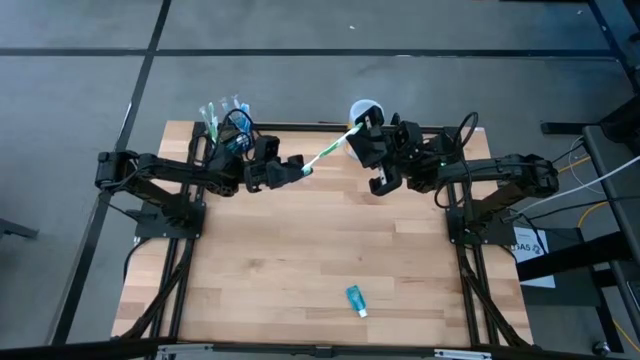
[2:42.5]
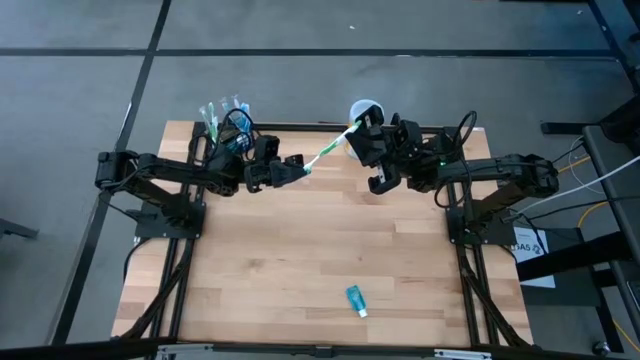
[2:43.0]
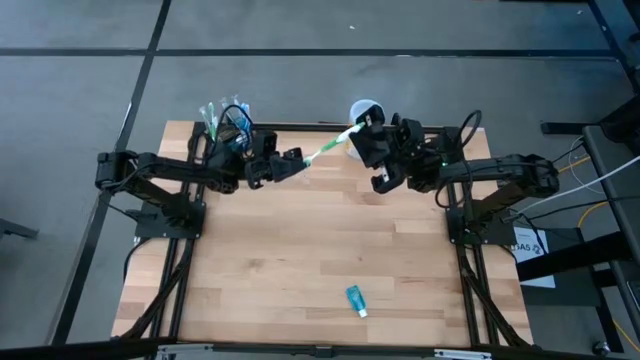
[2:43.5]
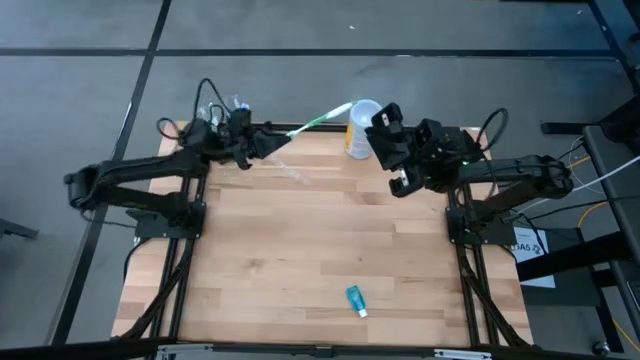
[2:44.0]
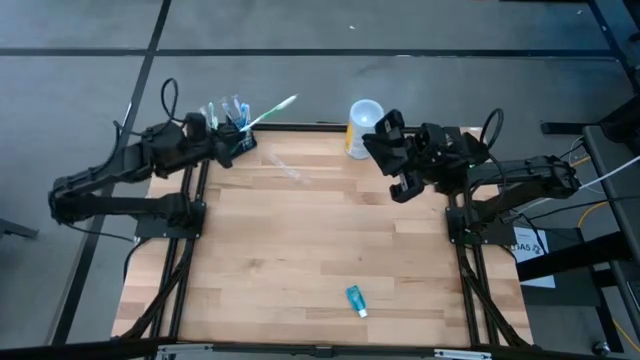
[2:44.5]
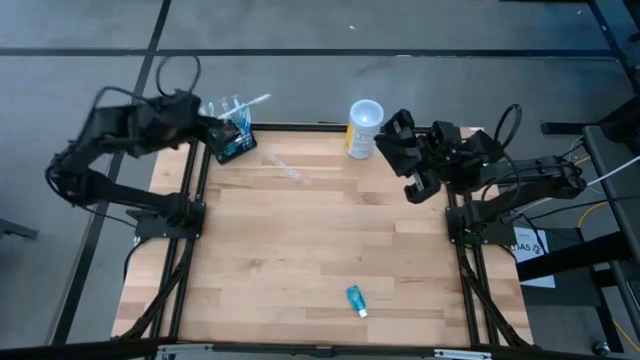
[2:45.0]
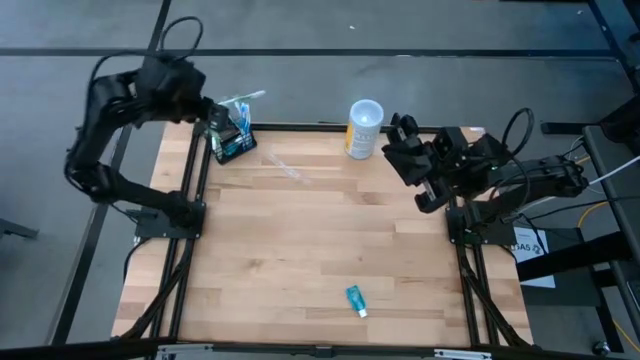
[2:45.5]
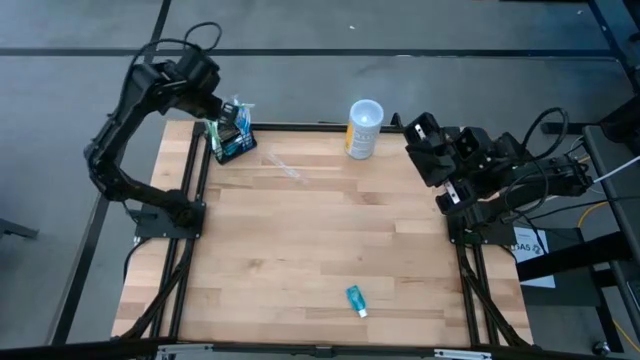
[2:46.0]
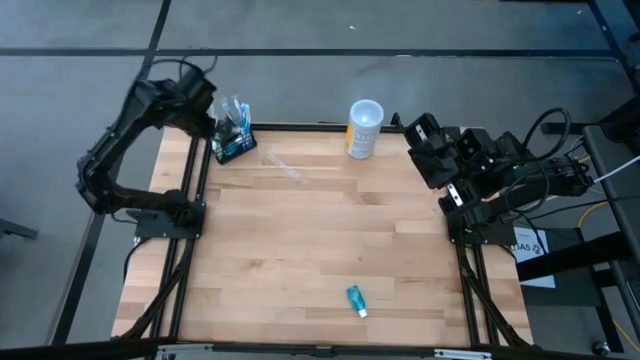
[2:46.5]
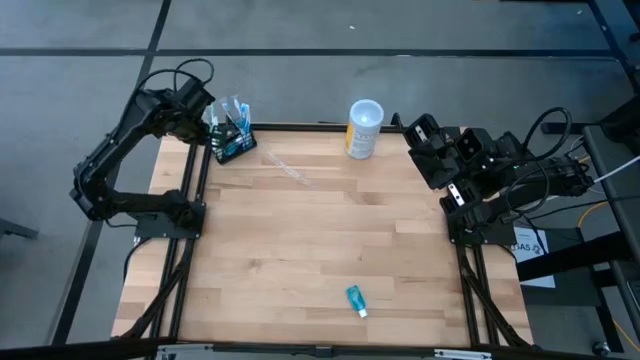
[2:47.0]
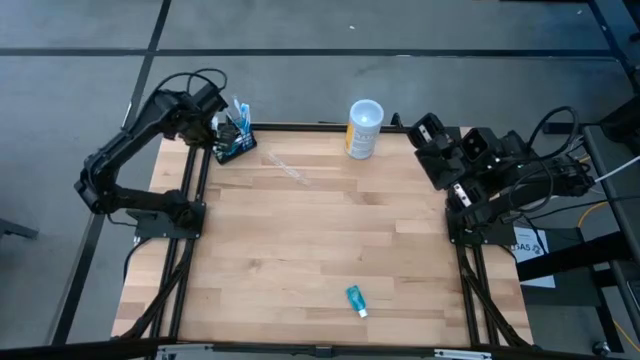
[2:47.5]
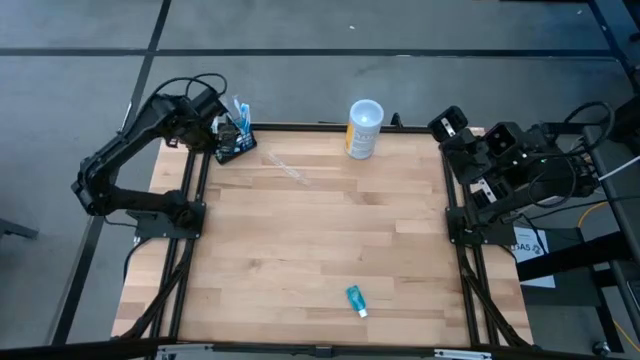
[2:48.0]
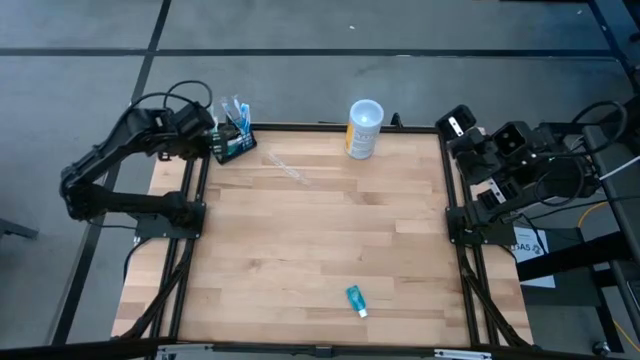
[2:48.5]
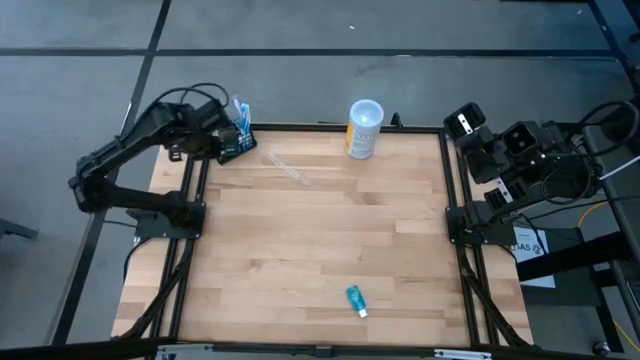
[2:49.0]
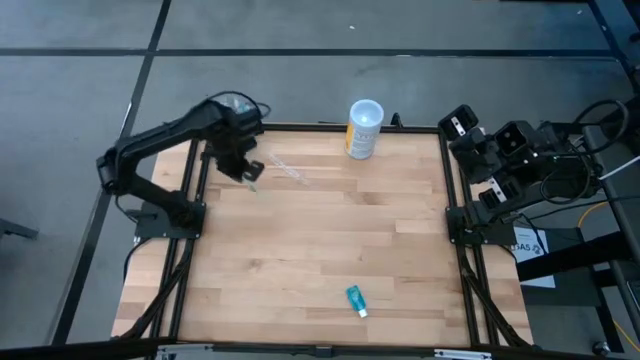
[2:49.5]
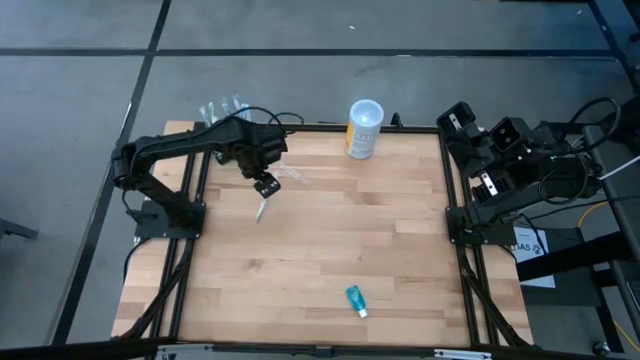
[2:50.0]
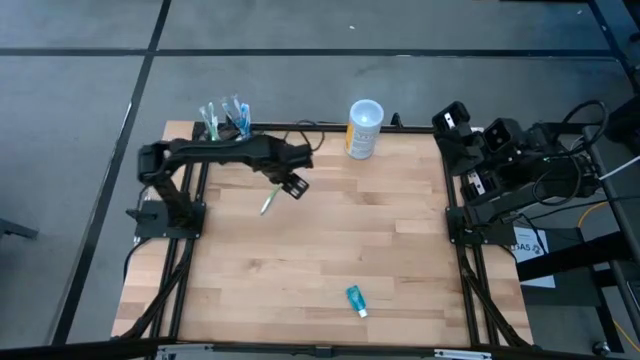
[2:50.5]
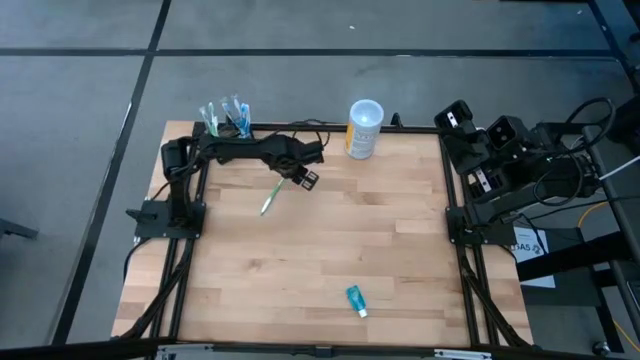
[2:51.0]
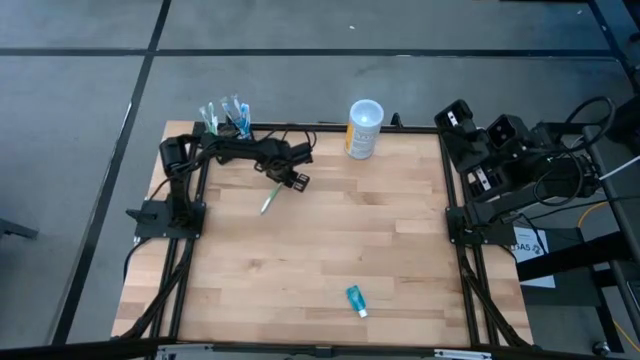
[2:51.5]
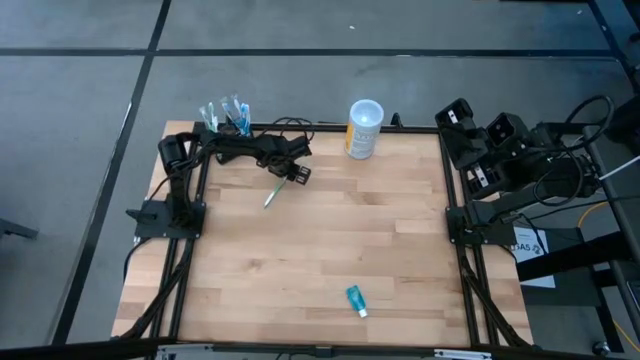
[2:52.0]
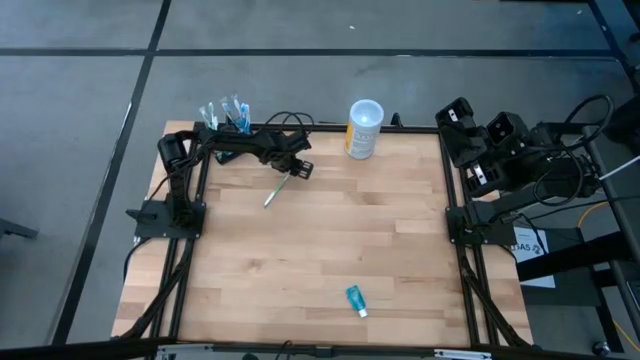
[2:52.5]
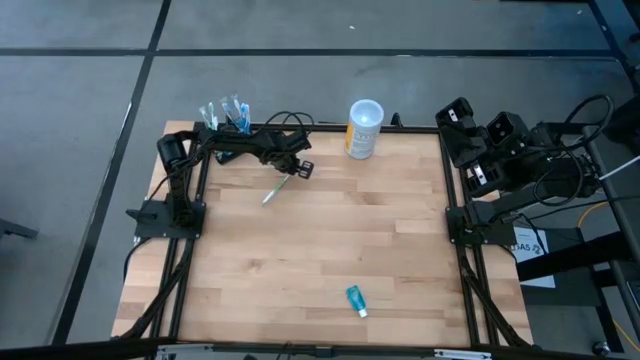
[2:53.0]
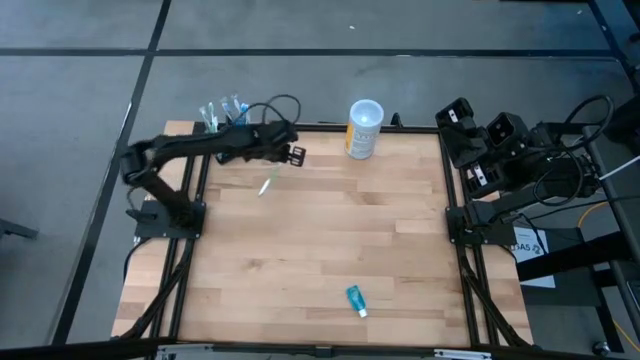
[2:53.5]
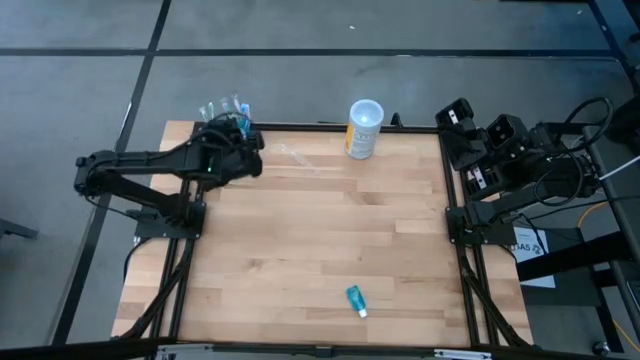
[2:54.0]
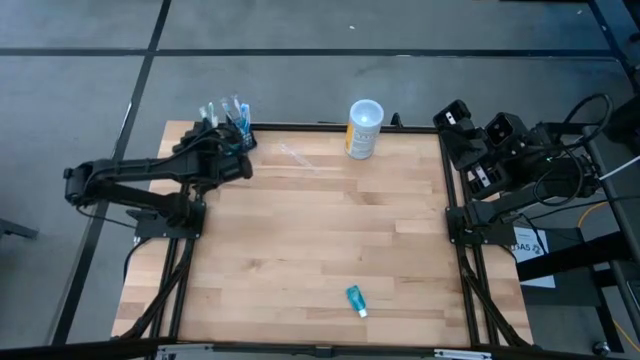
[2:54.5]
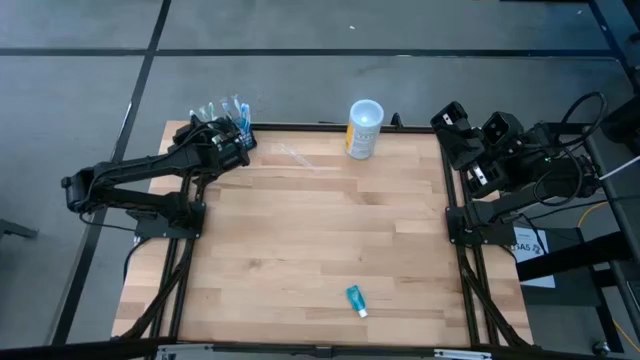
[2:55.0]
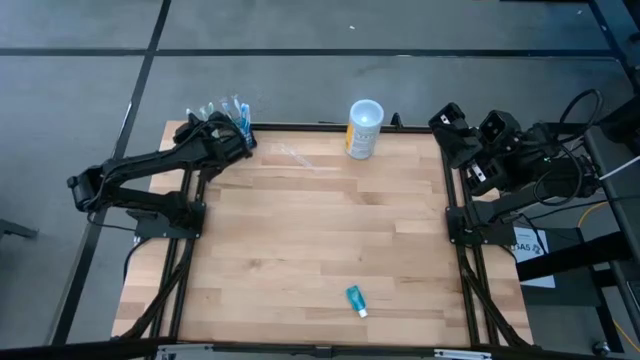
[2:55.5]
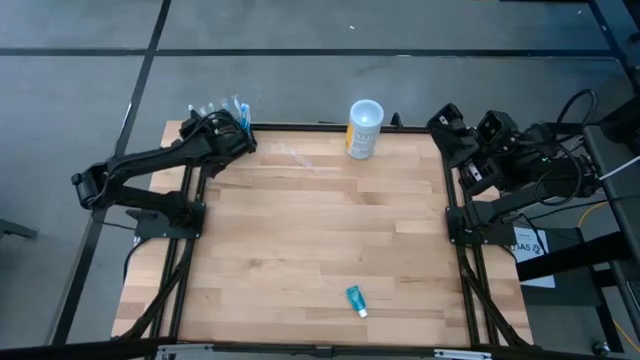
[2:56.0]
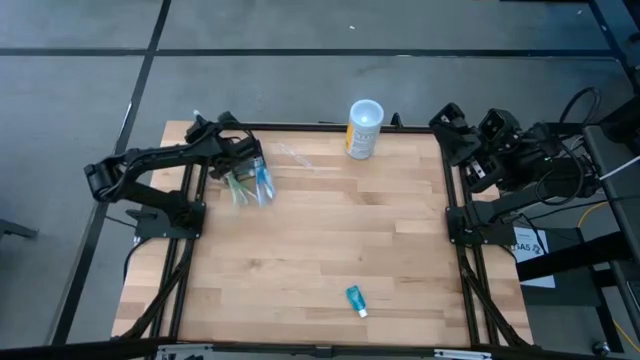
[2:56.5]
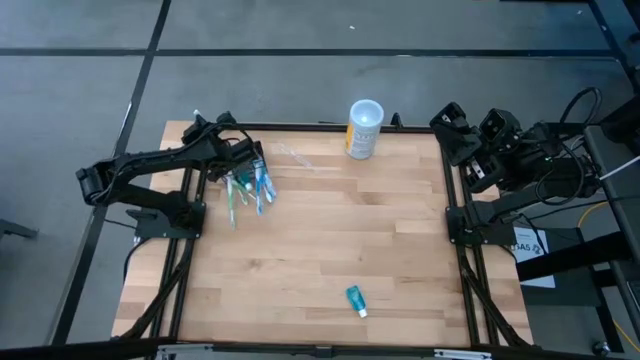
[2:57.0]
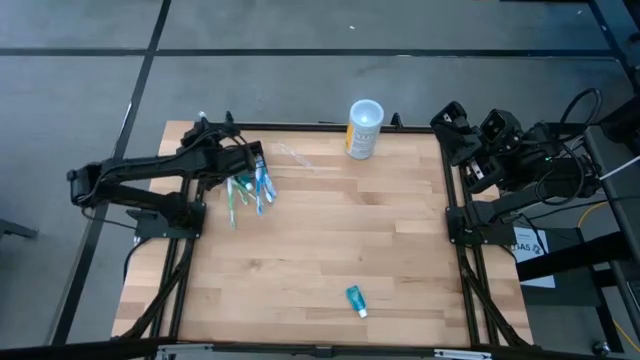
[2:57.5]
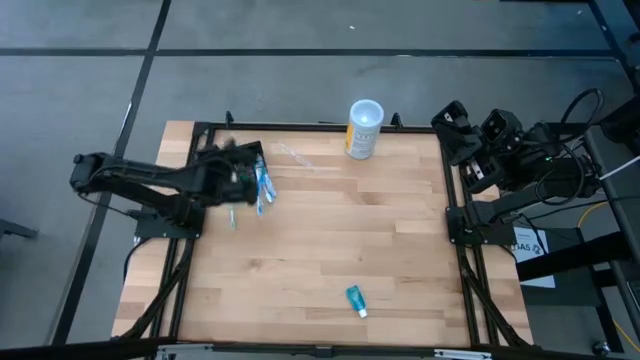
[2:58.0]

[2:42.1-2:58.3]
Task: Pick & Place toothbrushing station
Put the green toothbrush into the left section of the black organizer

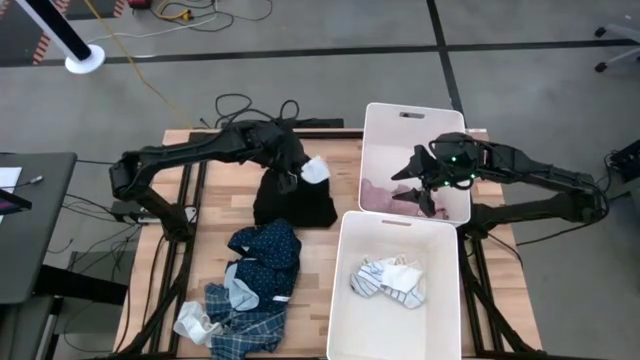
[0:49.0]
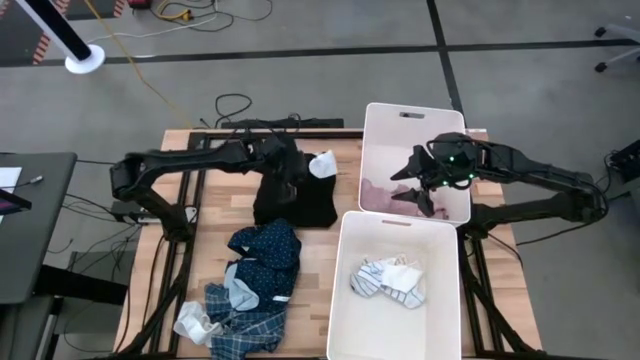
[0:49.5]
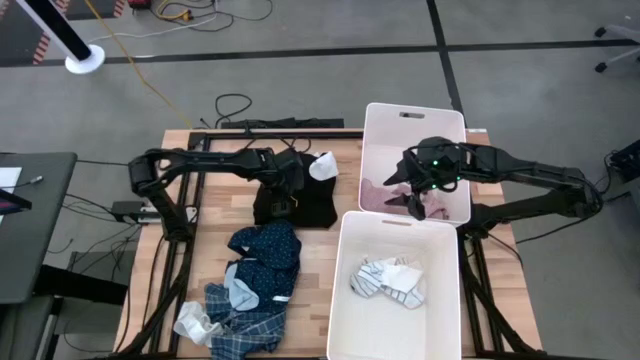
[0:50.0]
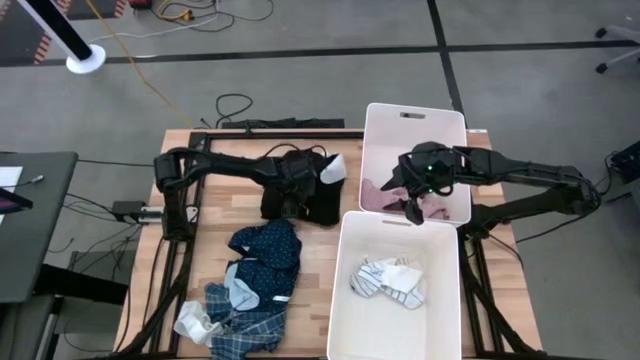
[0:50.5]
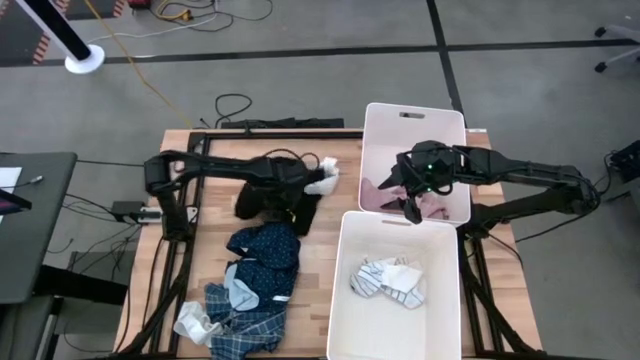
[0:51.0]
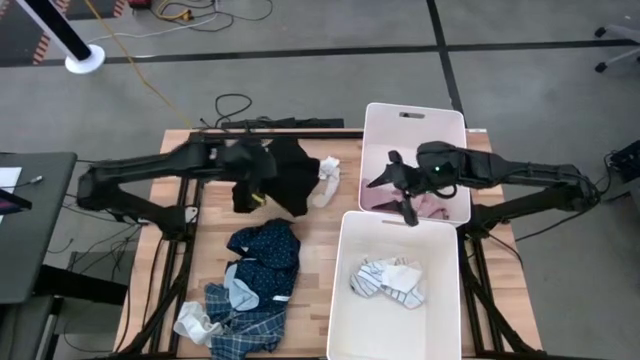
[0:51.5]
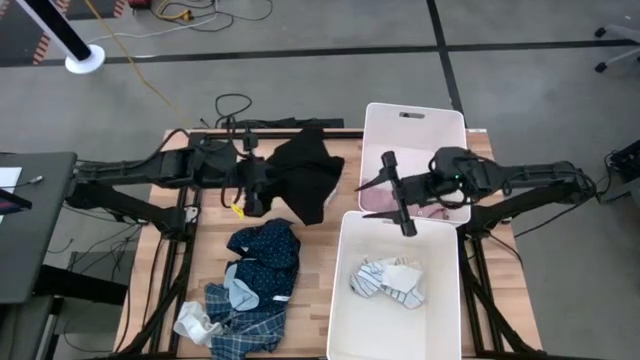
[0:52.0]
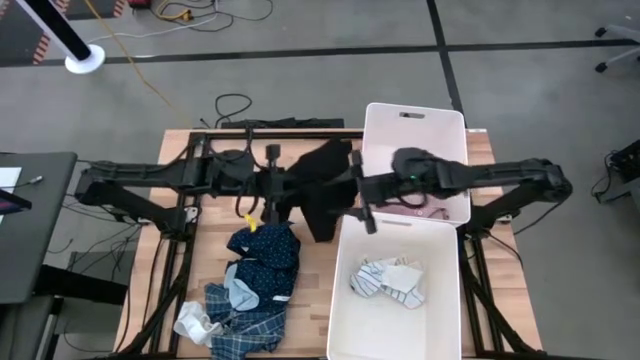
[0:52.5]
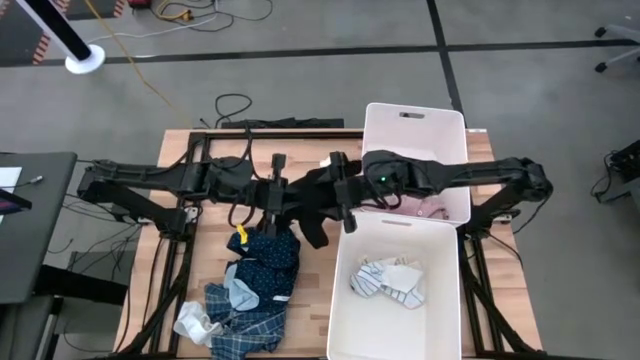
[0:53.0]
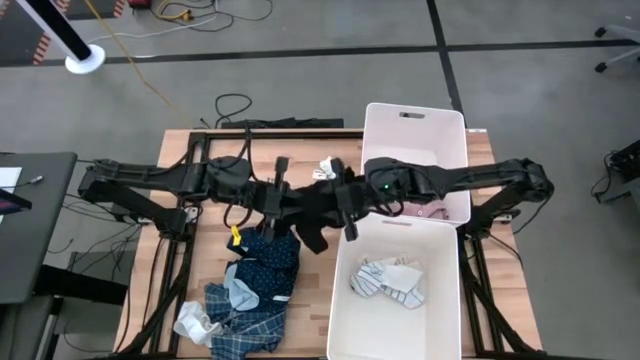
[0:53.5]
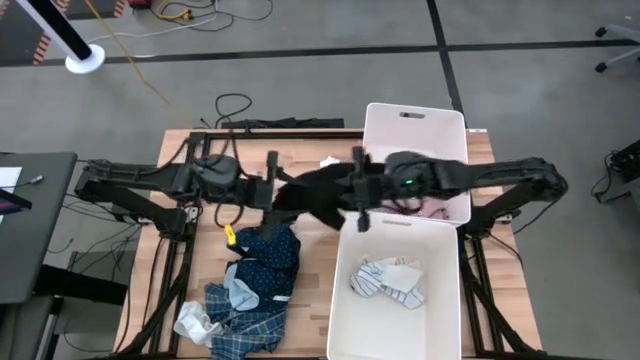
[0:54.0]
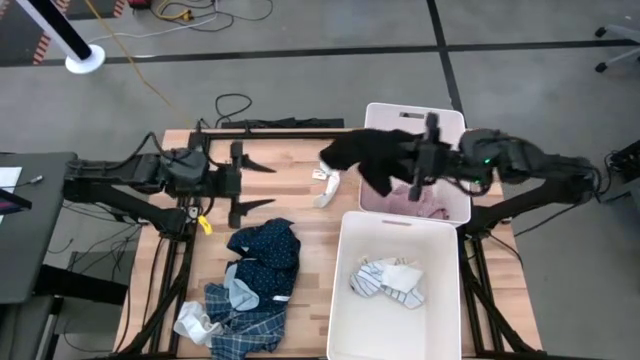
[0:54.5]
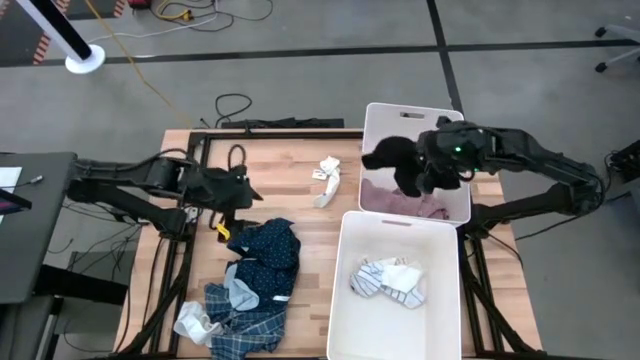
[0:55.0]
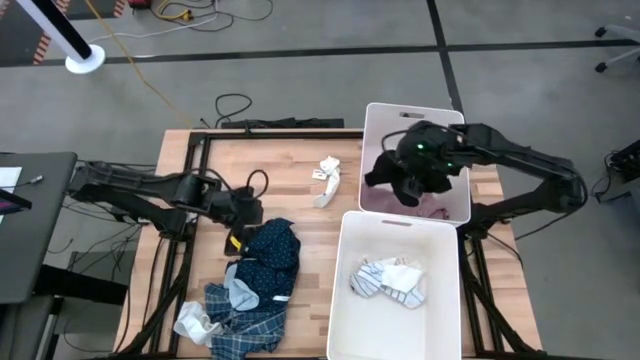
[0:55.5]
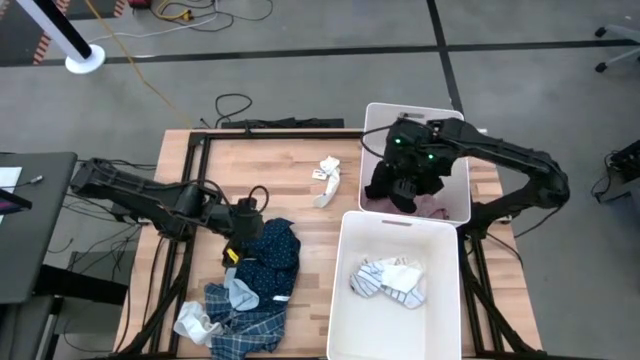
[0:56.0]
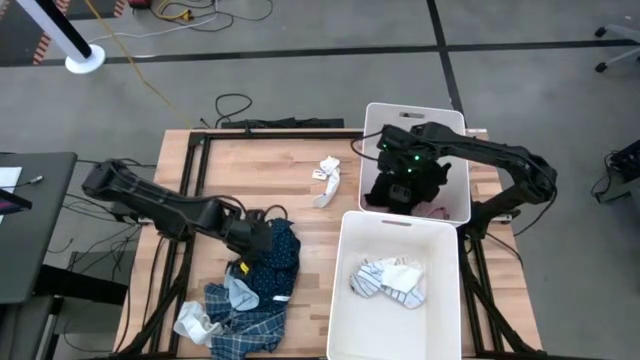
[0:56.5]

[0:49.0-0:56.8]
Task: Sort clothes
Put the black jacket into the top laundry bin
